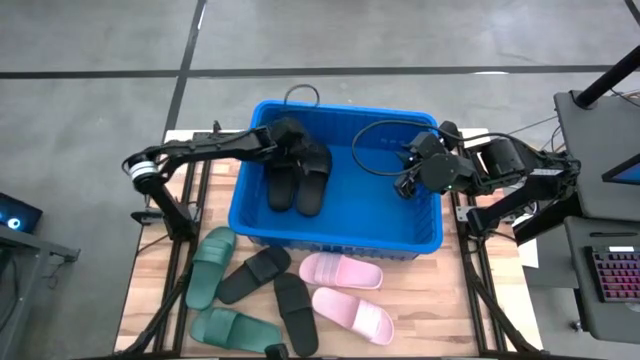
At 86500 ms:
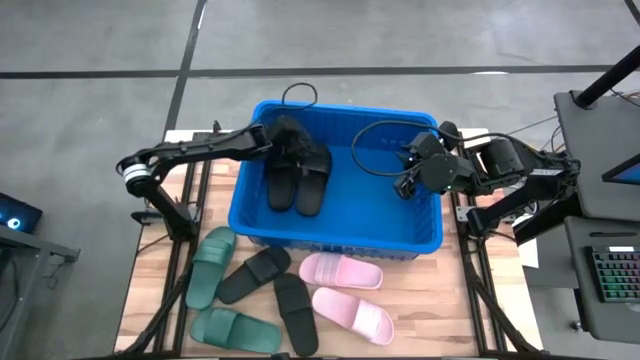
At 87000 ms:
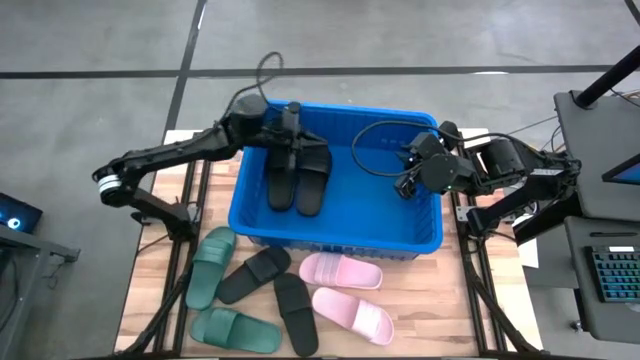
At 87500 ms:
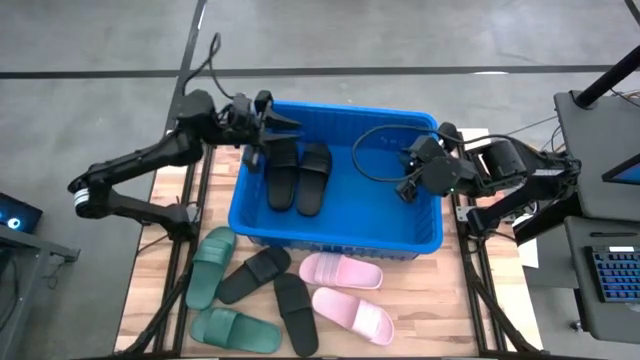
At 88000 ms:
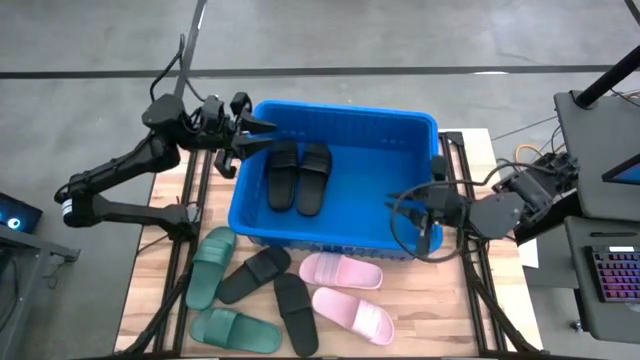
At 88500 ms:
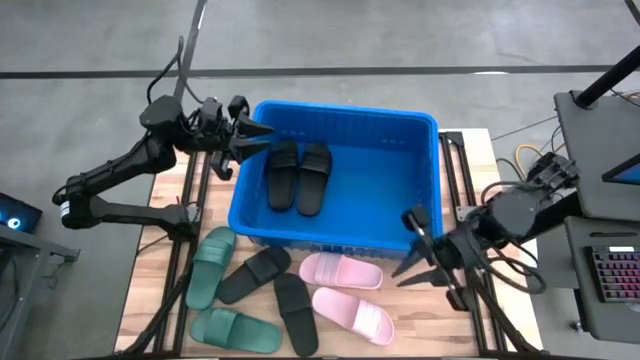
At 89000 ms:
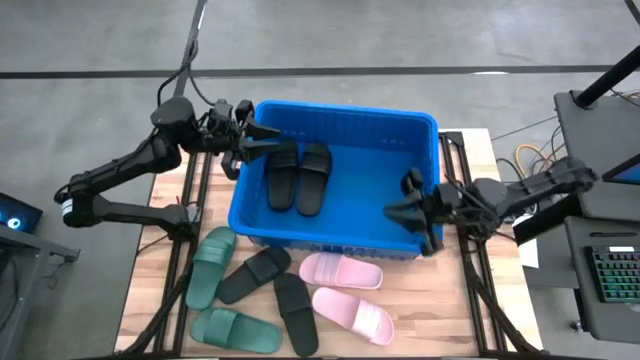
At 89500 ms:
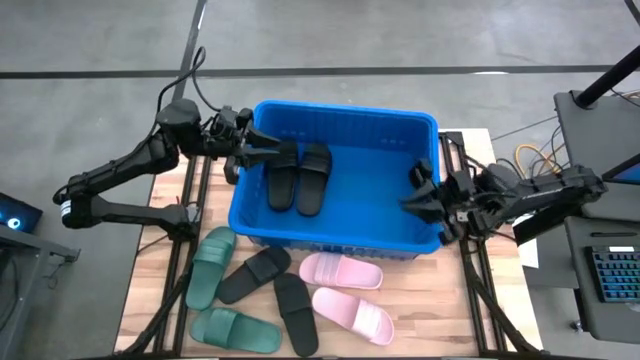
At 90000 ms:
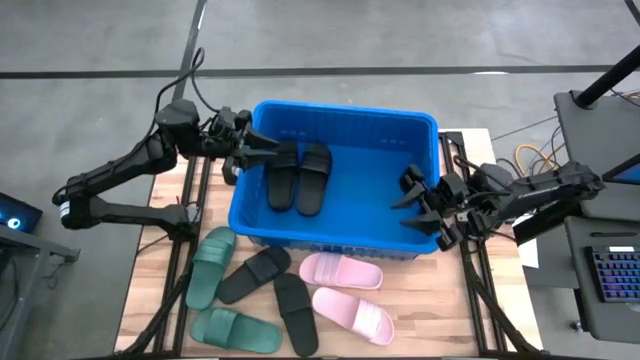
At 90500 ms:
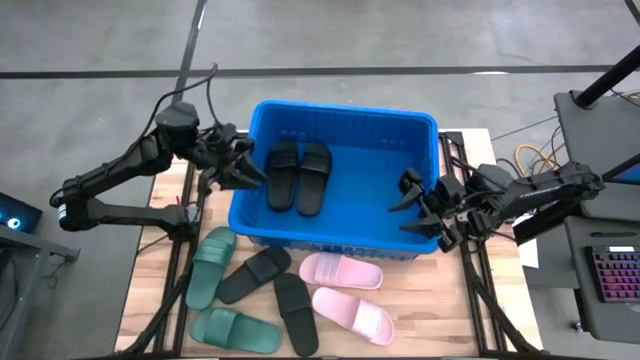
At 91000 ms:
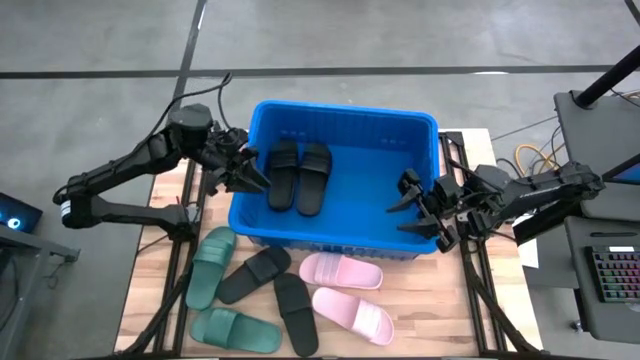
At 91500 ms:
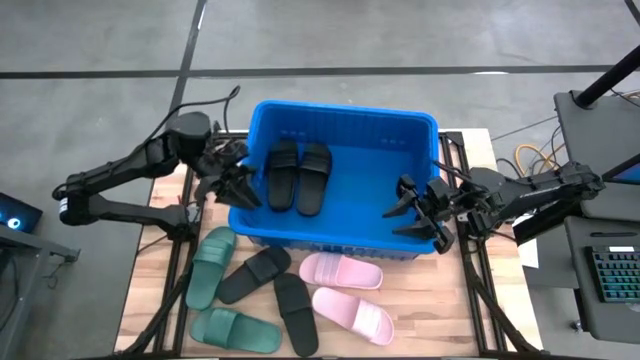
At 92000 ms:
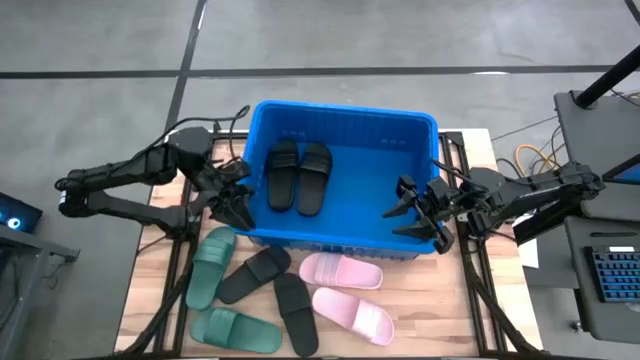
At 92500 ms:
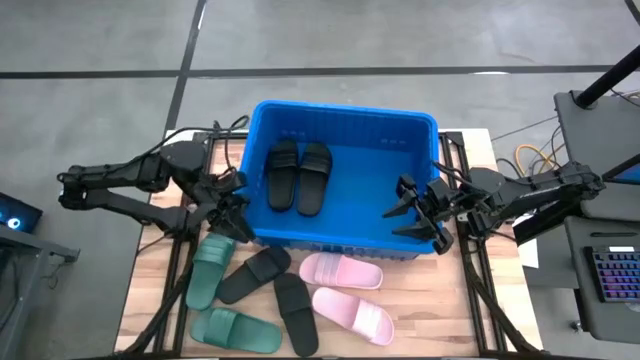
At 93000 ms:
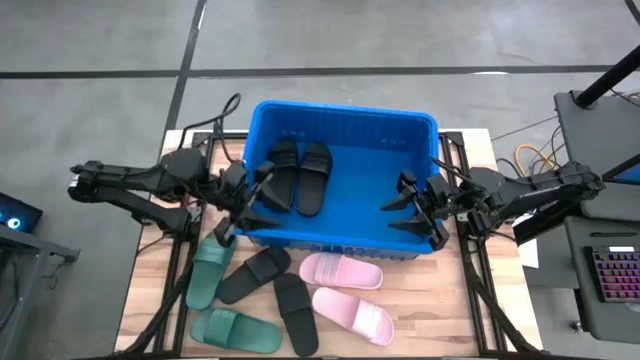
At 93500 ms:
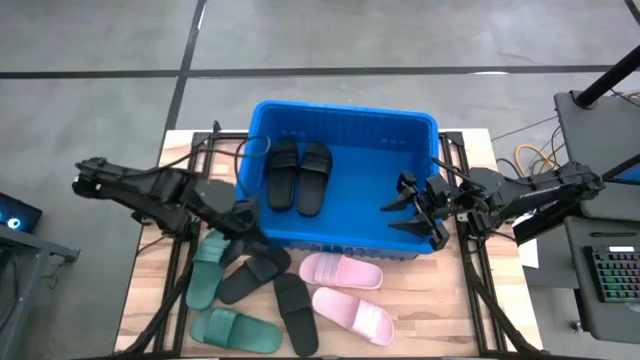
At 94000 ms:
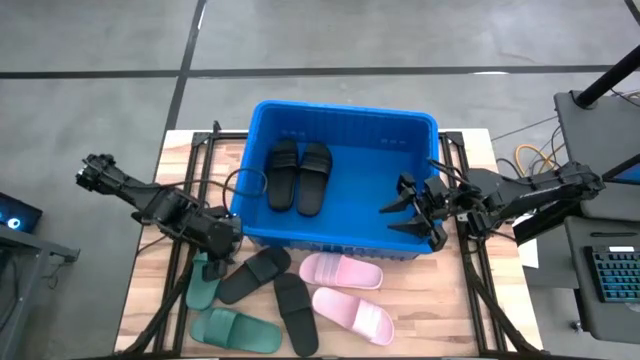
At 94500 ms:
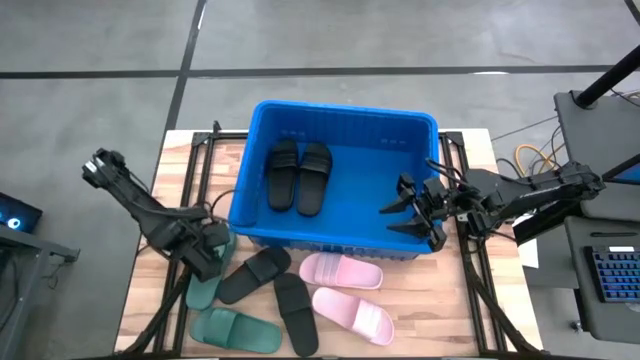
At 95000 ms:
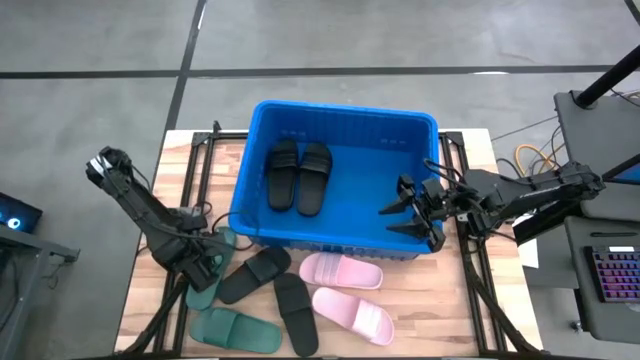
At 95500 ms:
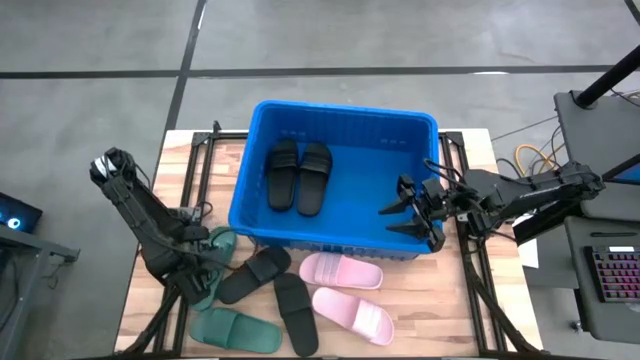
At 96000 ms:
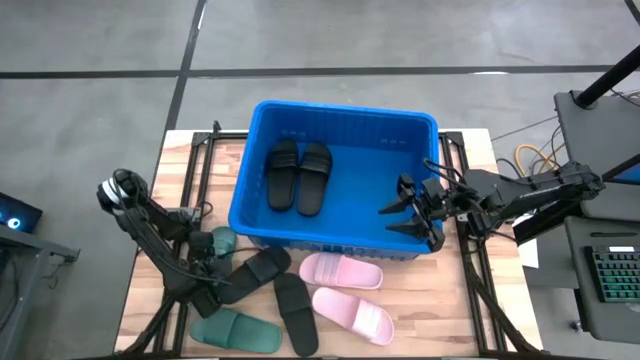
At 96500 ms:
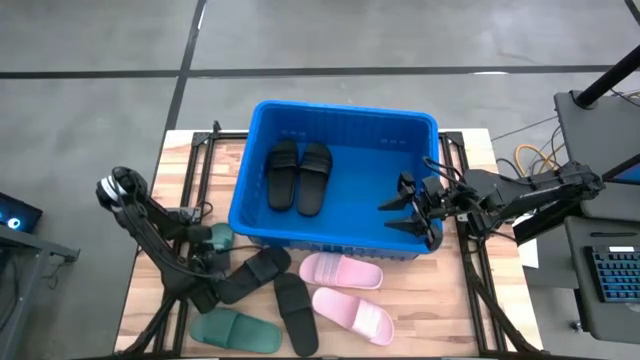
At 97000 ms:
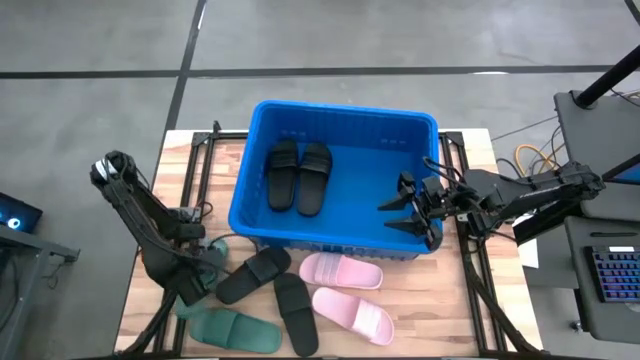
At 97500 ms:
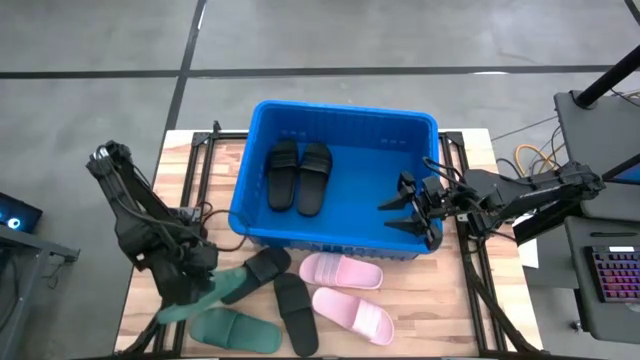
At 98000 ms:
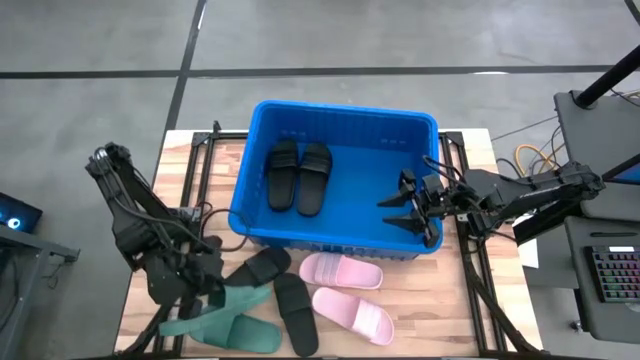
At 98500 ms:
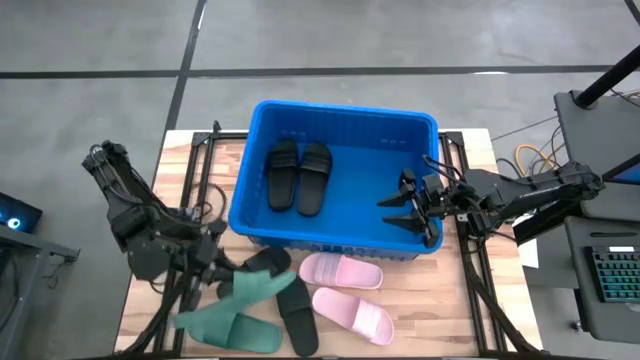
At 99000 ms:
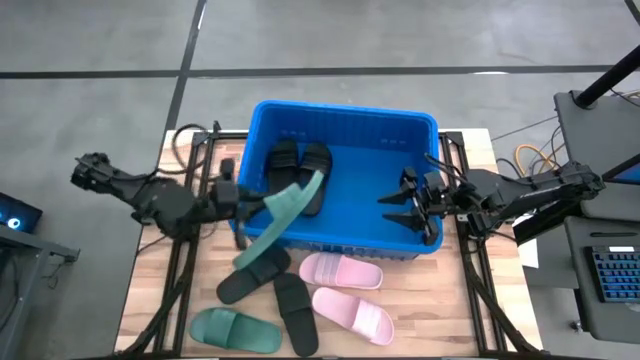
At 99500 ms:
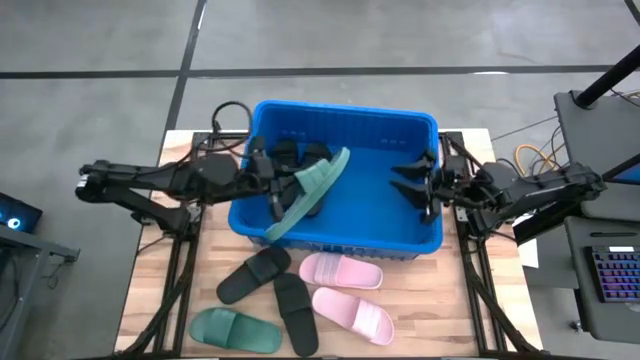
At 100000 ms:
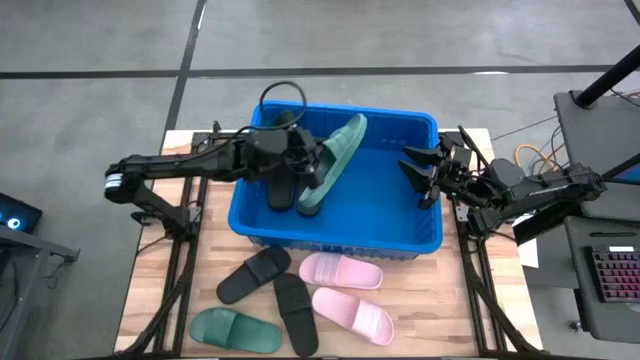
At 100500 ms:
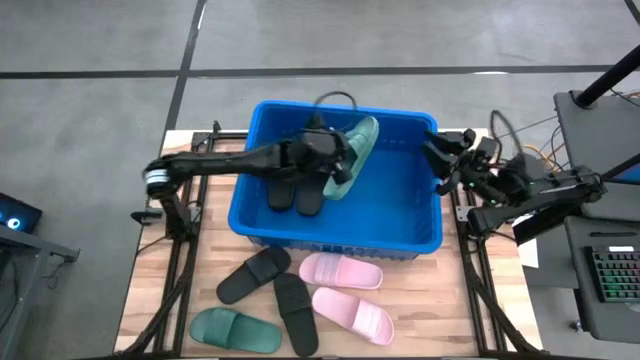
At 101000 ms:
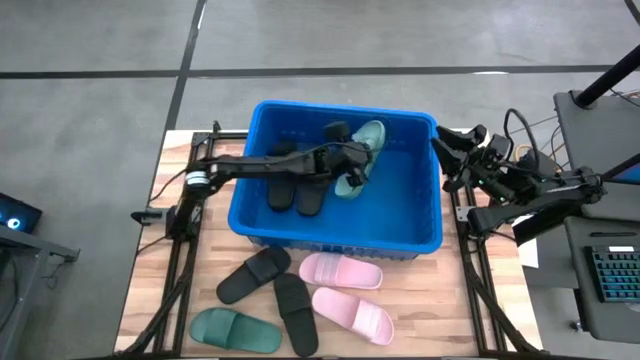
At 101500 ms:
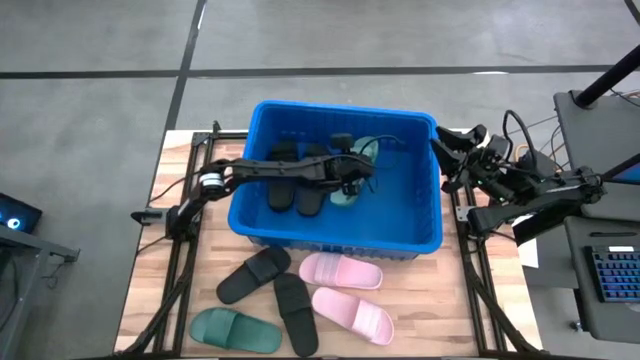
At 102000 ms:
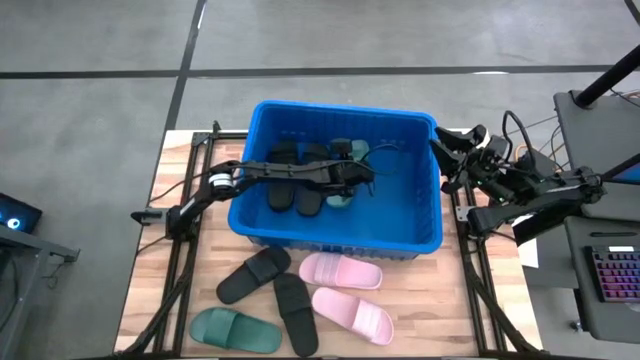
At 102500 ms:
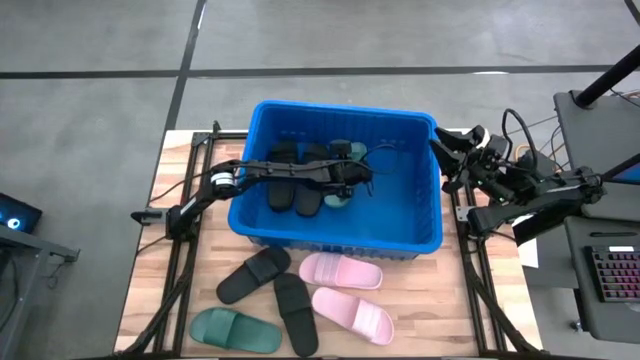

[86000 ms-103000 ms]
Task: Pick and place slides into bin
Put the top green slide into the blue bin

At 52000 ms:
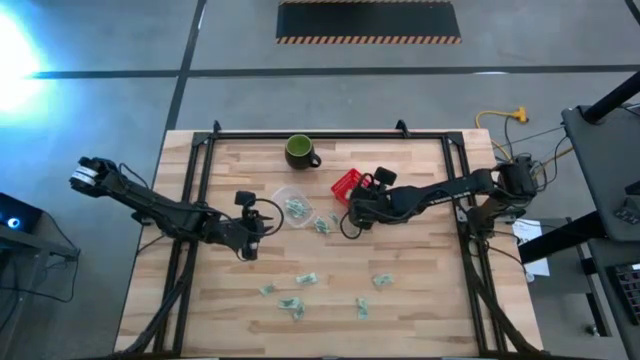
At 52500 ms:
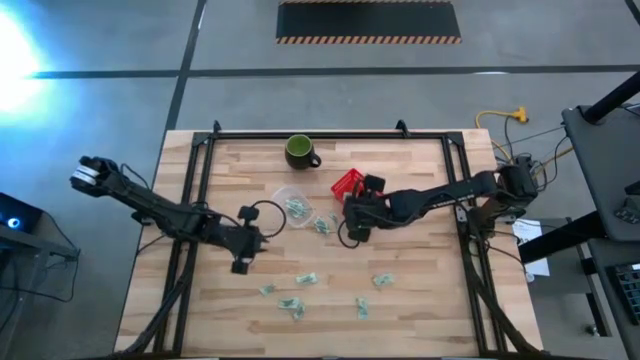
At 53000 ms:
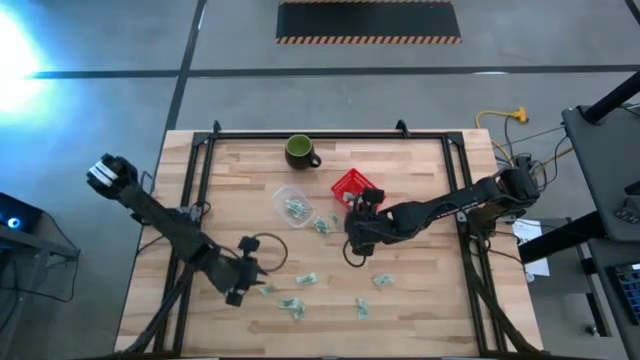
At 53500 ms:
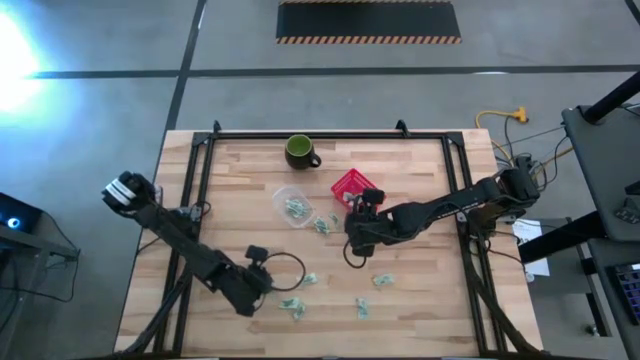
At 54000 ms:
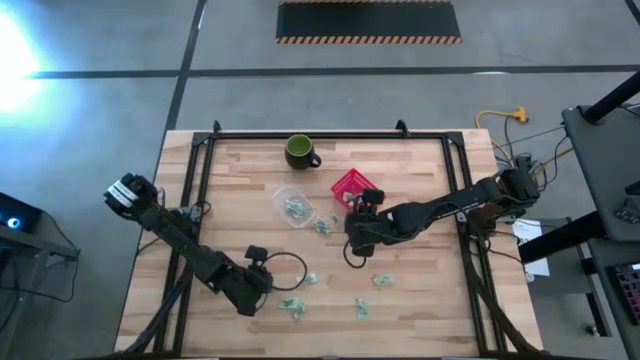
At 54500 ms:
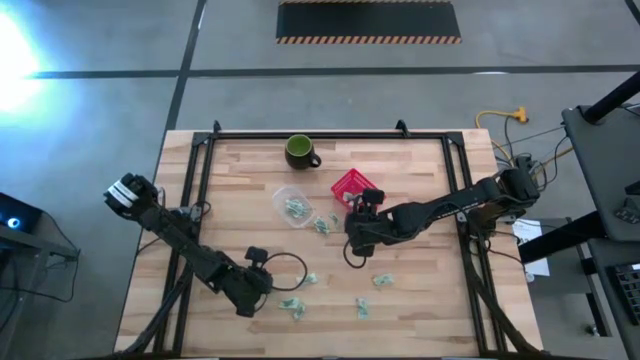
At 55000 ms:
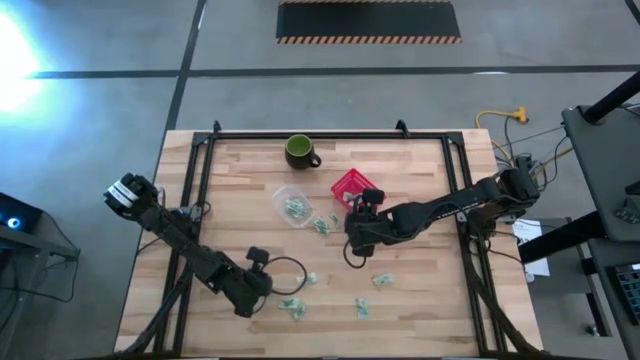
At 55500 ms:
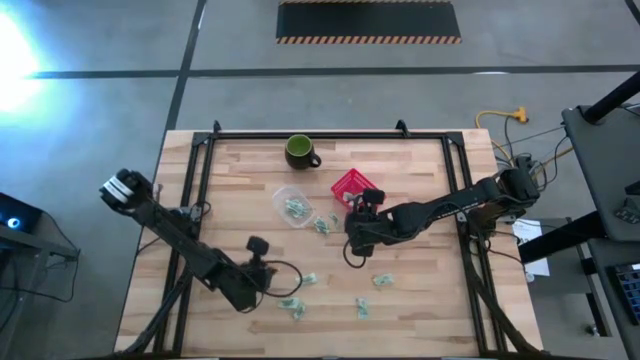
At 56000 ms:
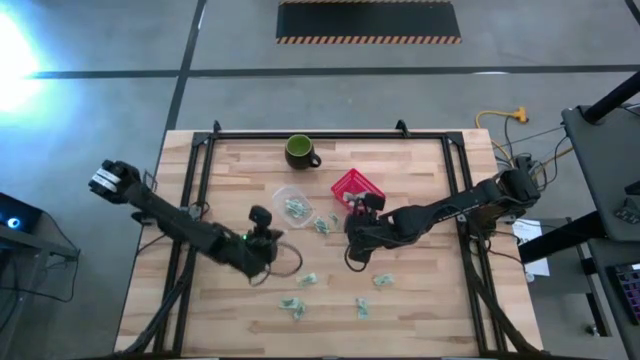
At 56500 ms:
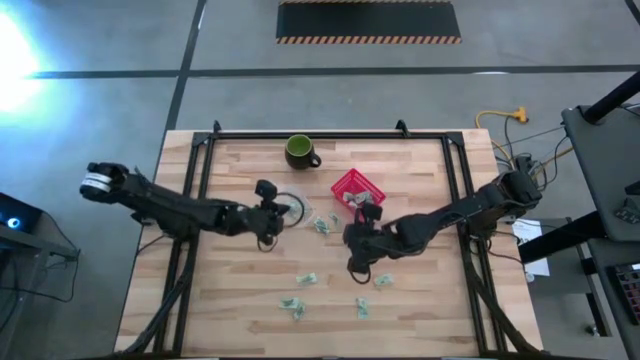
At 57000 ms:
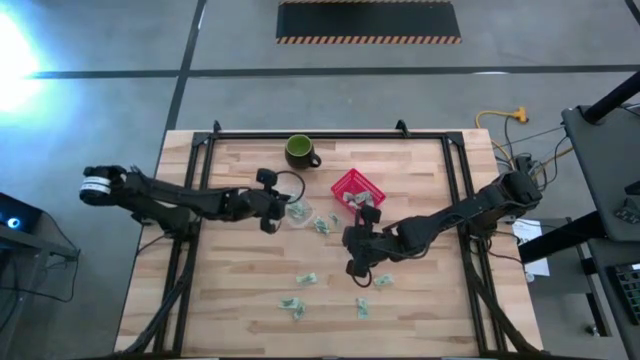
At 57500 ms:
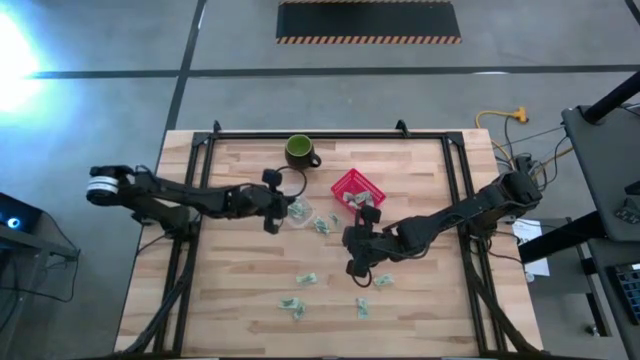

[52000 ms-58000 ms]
Task: Pick and place items into bin
Put the stevia packet into the transparent bin
